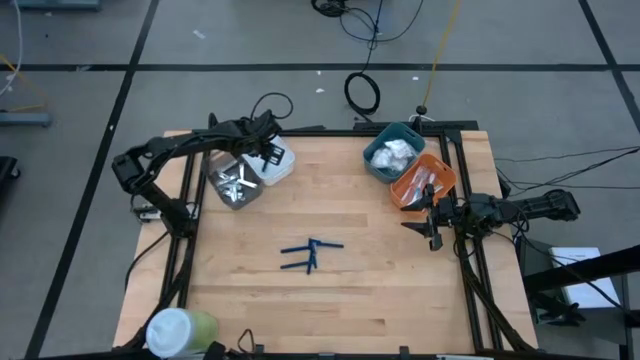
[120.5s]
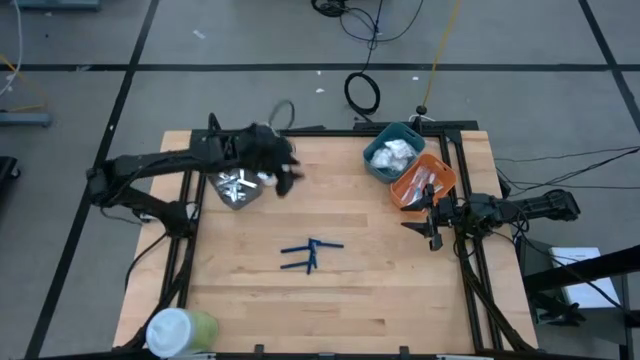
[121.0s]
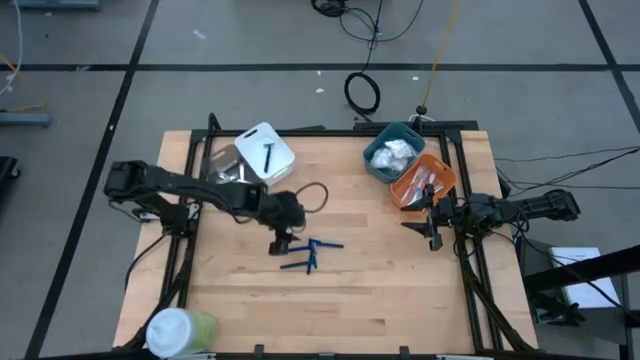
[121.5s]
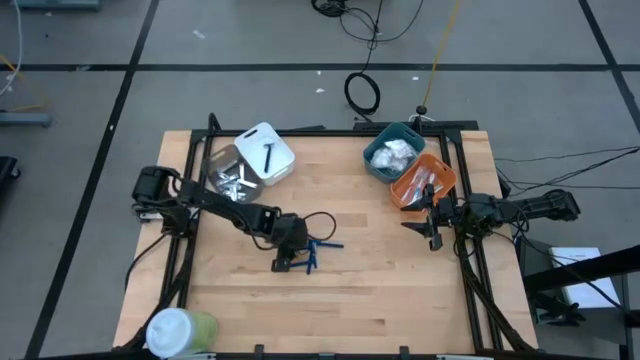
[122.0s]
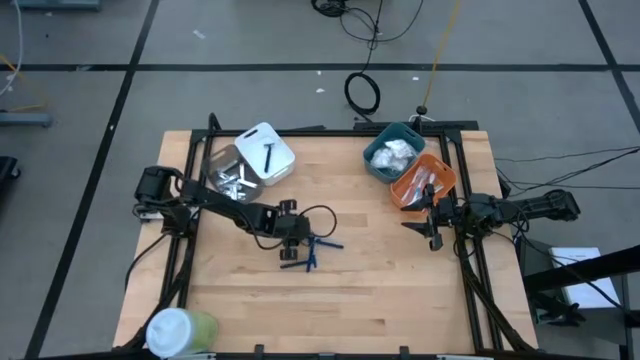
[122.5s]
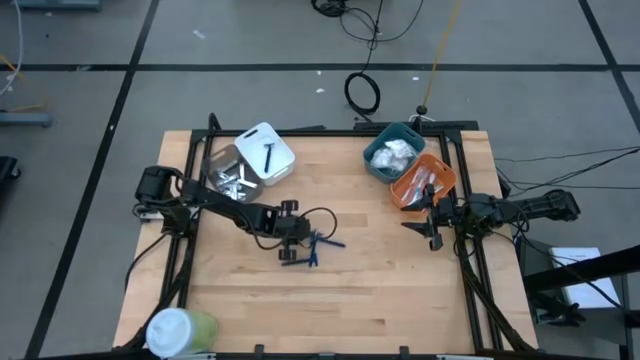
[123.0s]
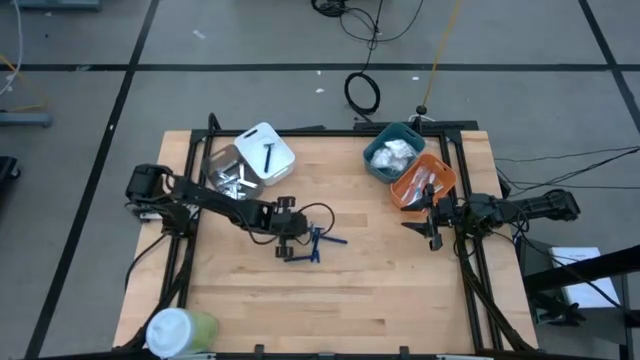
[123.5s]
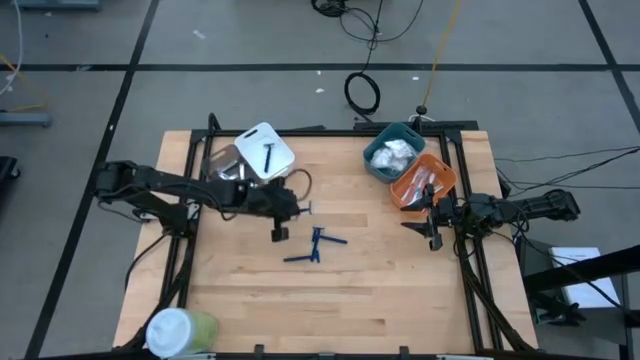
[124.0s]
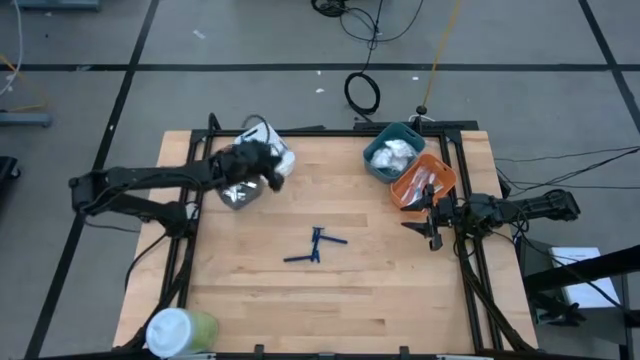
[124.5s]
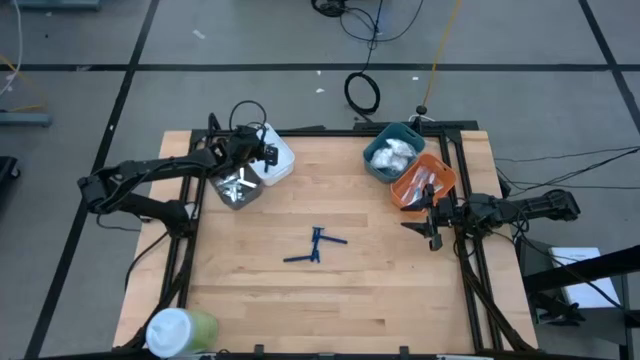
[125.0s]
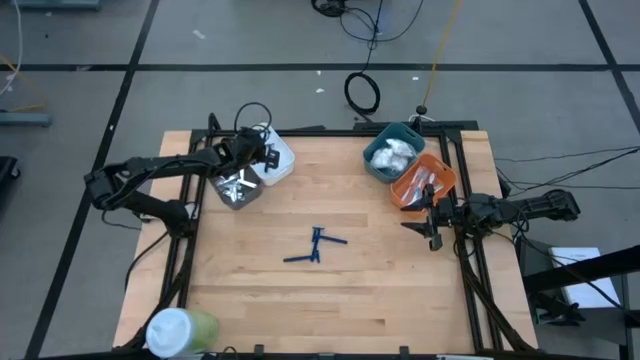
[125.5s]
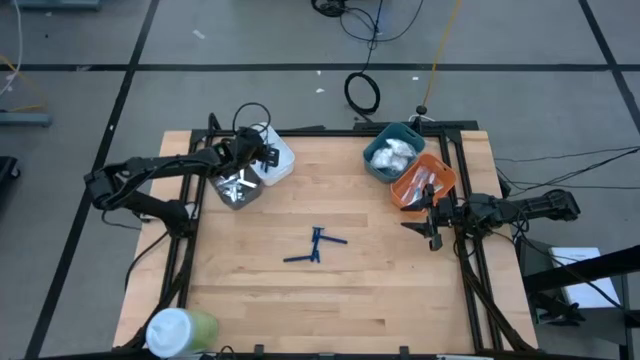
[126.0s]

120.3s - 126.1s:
Task: Pick & Place Travel size toiletries
Put the blue razor into the white bin

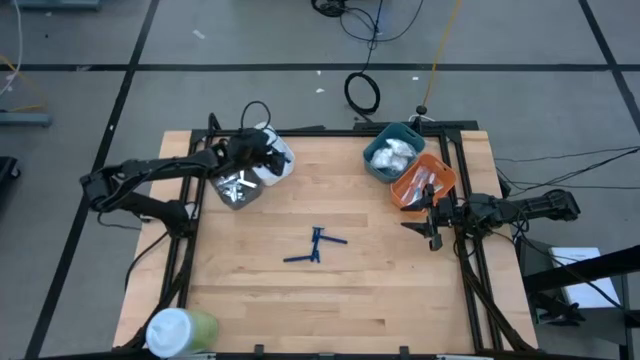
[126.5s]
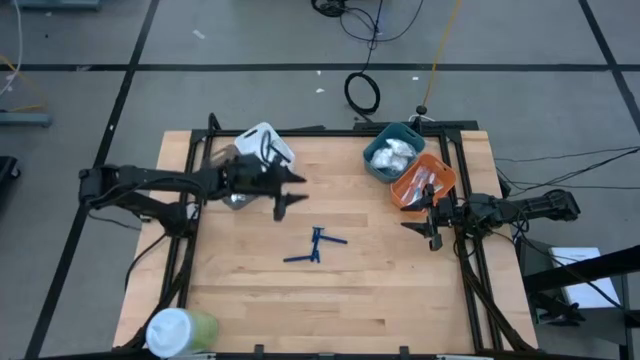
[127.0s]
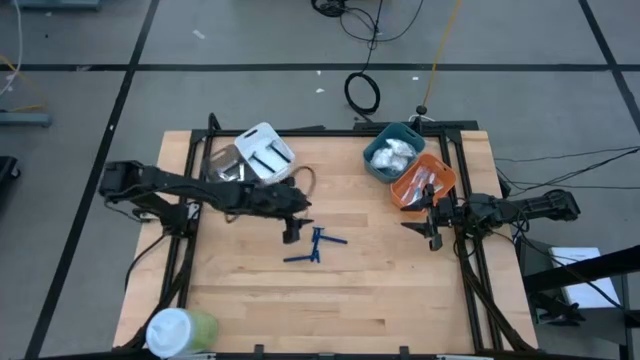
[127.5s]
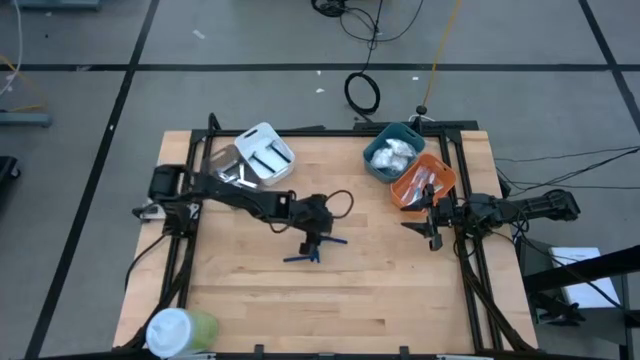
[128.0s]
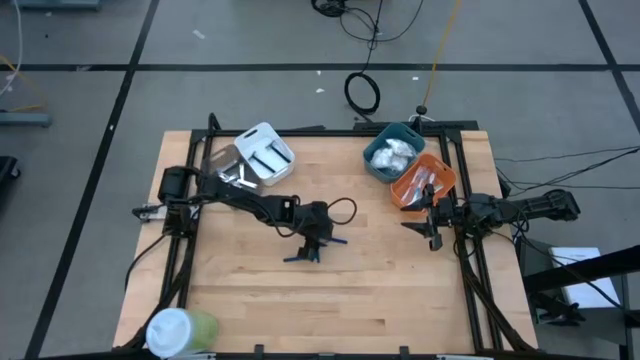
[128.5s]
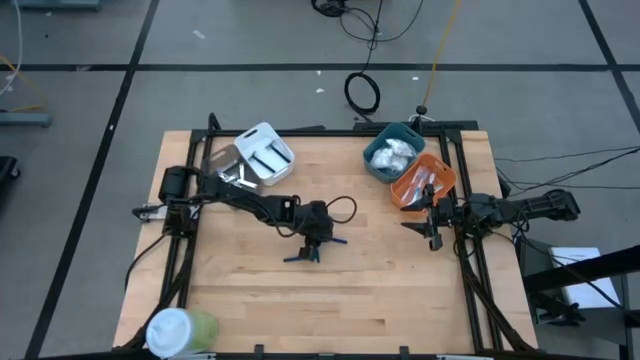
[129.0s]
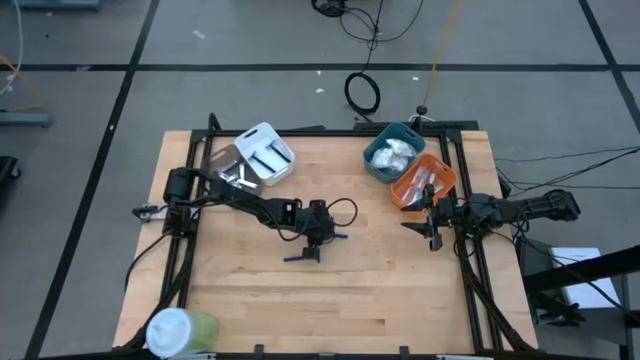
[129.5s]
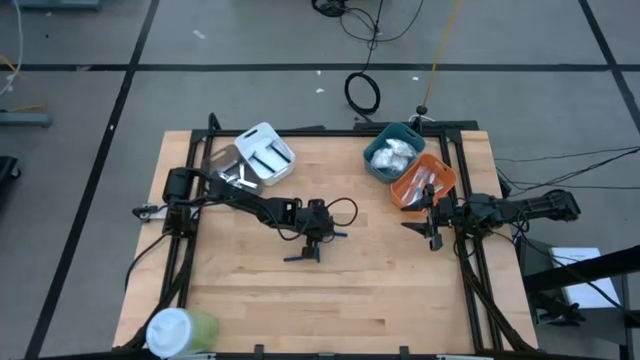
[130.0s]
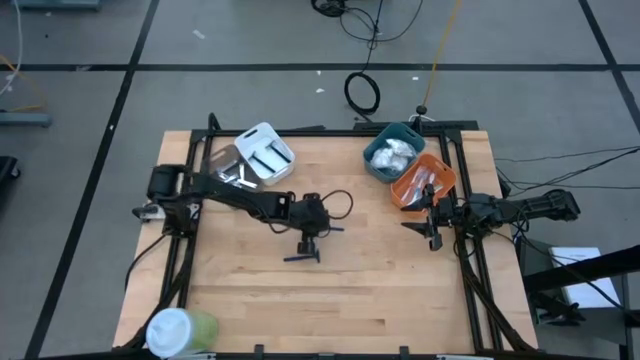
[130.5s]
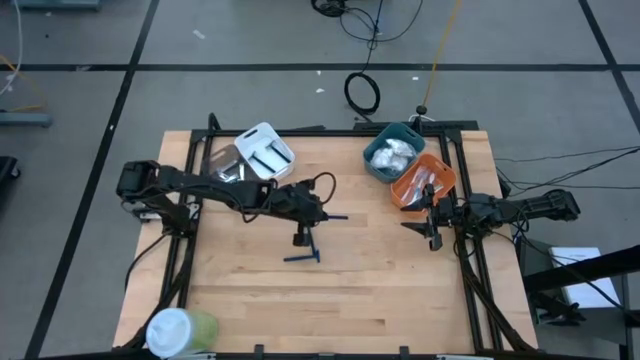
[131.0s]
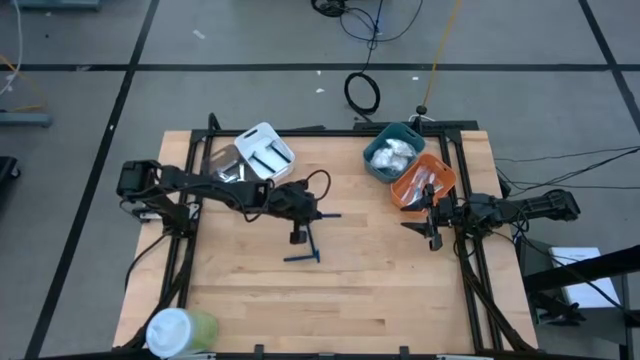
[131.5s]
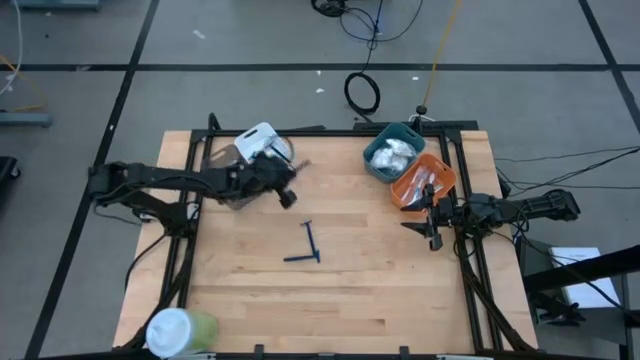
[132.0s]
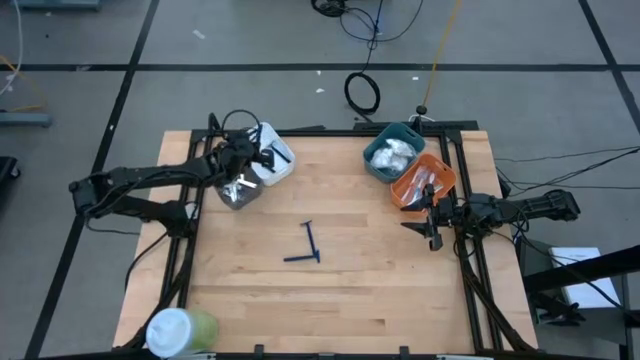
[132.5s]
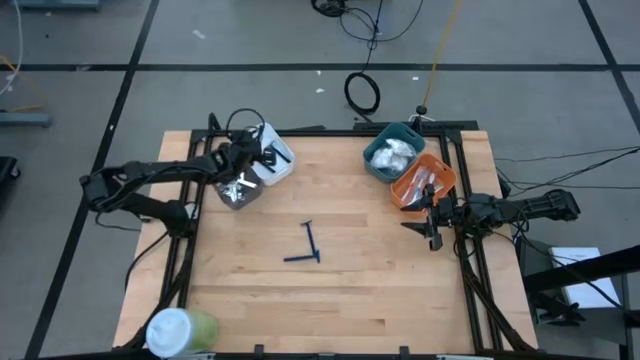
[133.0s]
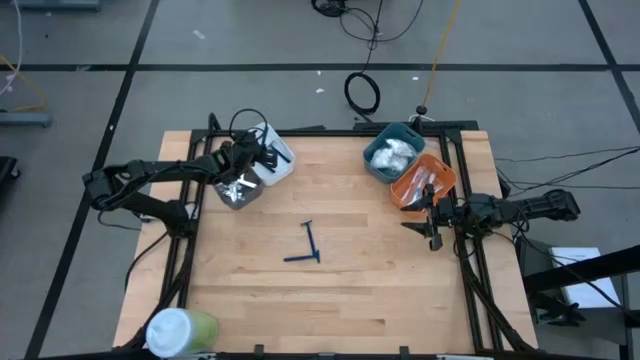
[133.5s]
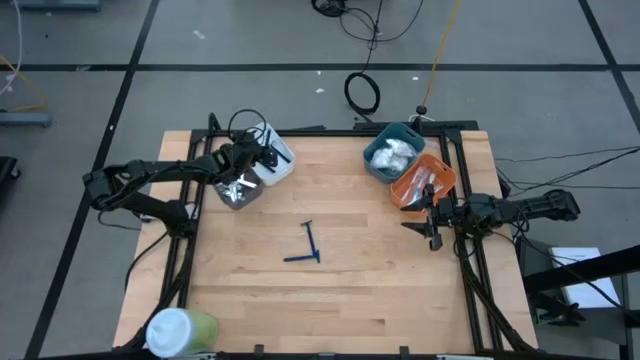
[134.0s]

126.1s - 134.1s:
Put the top right blue razor into the white bin

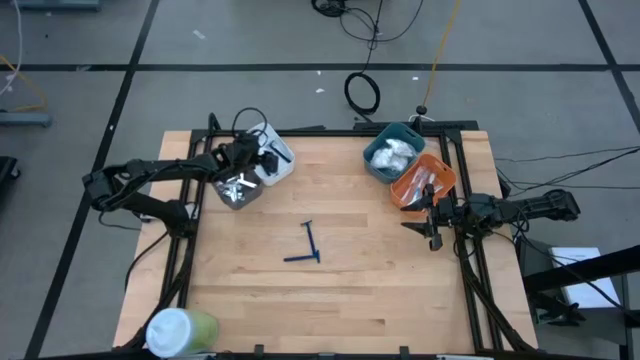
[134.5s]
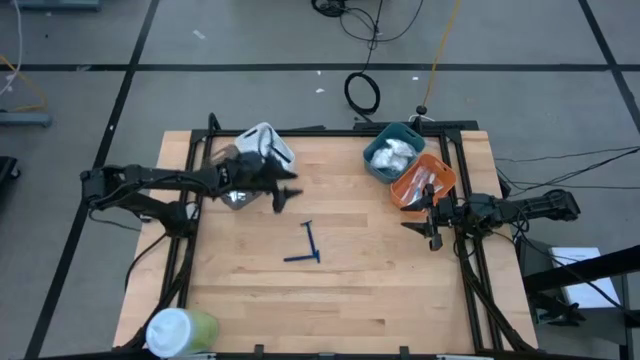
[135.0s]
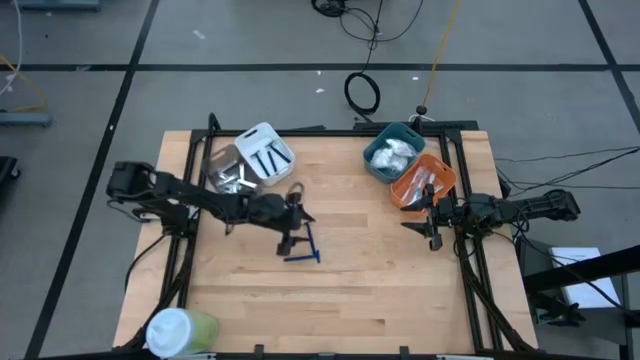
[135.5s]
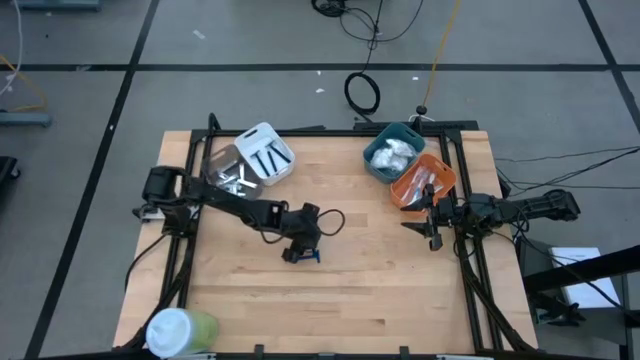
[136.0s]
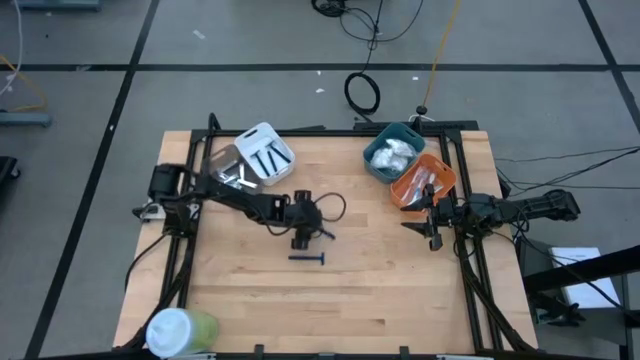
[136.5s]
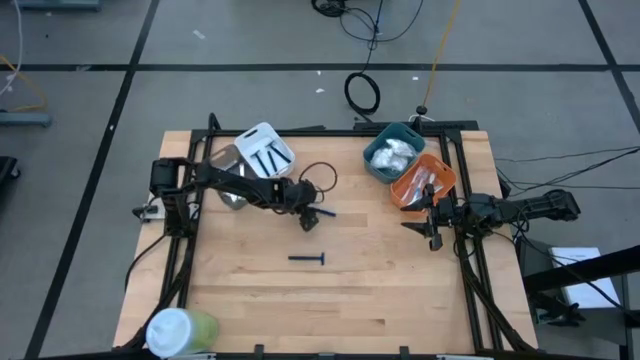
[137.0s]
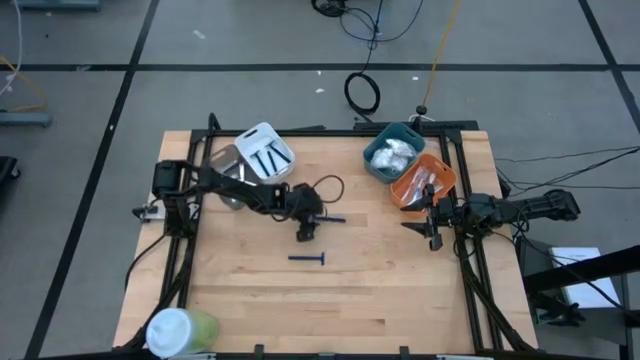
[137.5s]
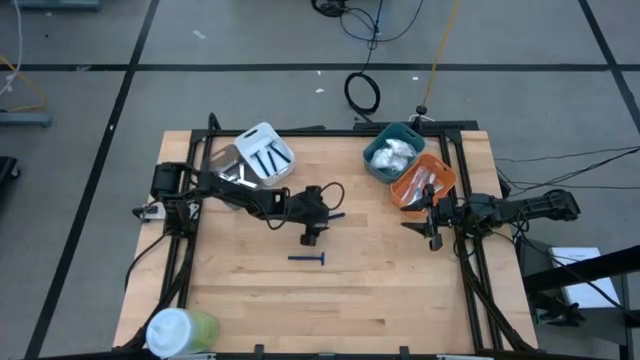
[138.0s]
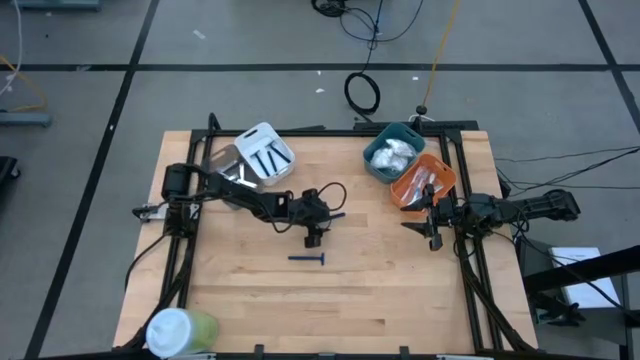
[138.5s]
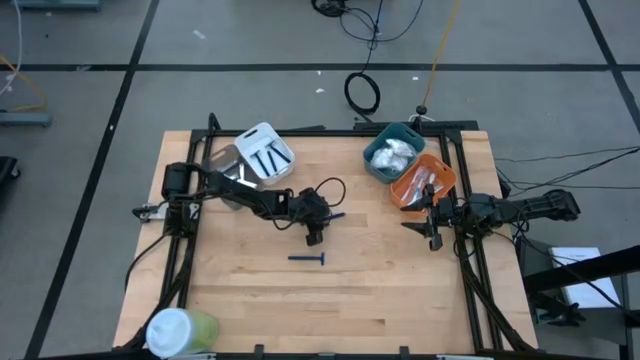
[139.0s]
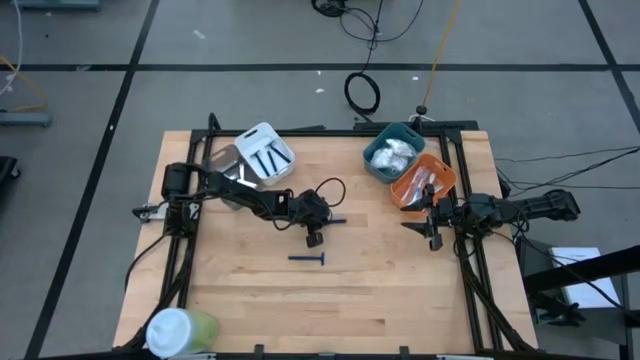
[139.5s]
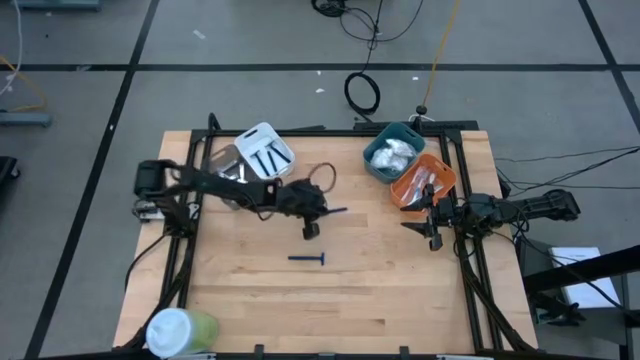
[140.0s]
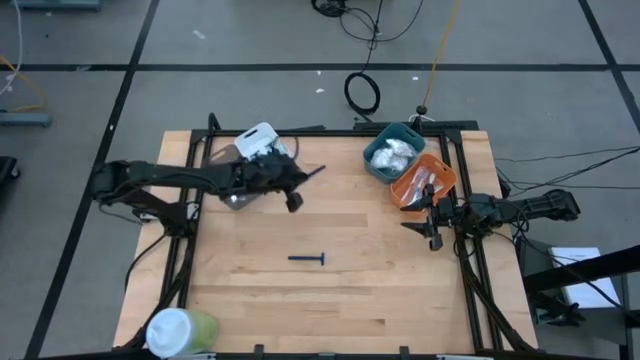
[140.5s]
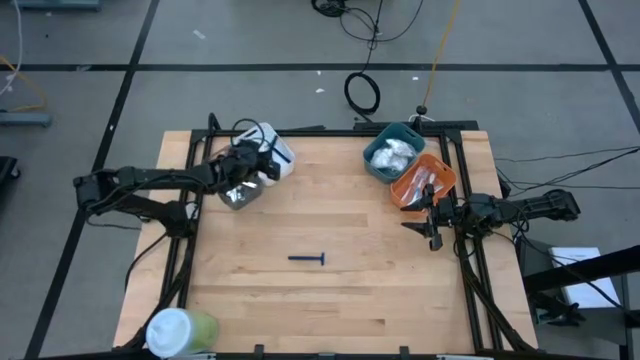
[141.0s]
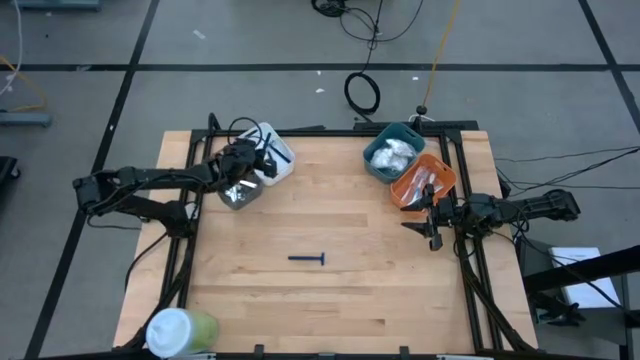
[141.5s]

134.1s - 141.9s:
Put the top blue razor into the white bin
